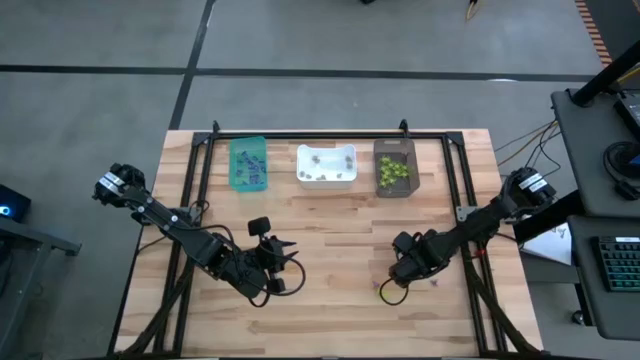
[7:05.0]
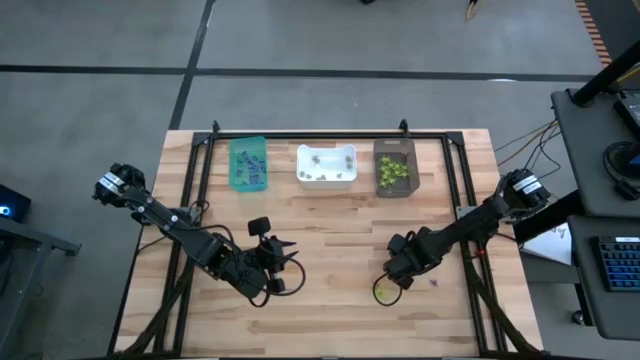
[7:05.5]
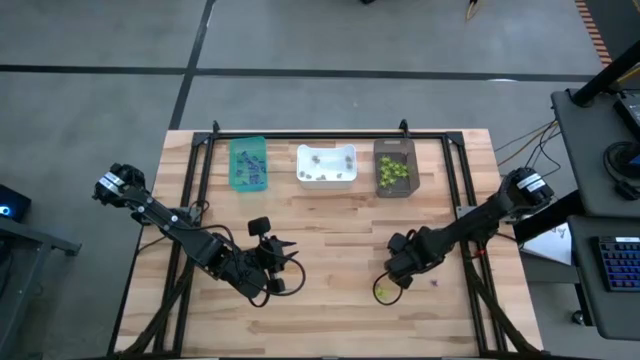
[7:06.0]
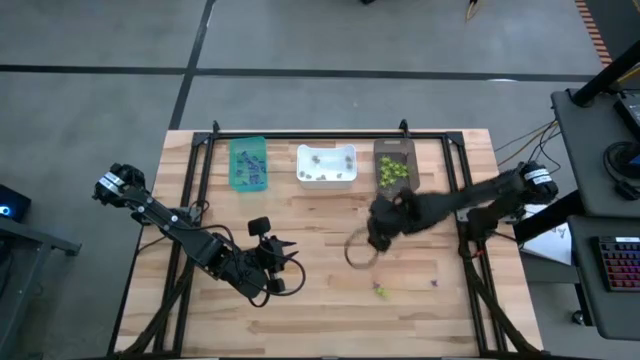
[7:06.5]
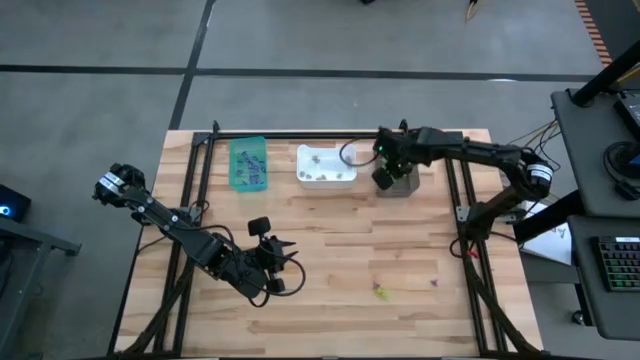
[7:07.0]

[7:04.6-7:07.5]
Task: Sort Halloween decoration
Put the green spider toy into the black bin

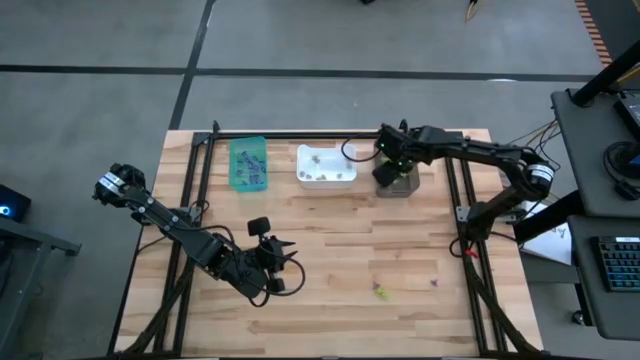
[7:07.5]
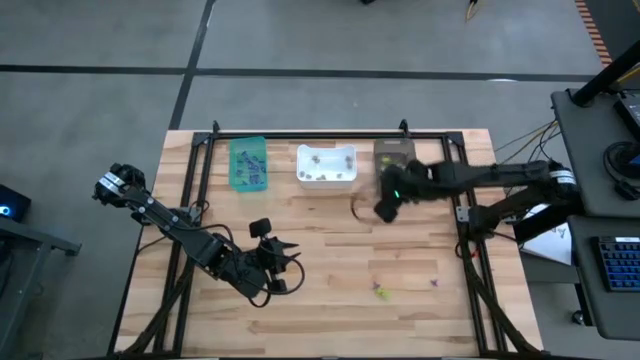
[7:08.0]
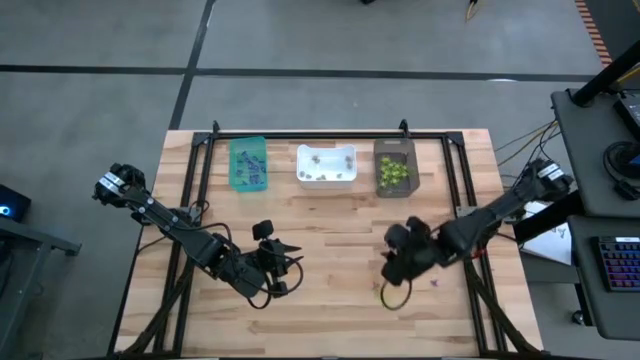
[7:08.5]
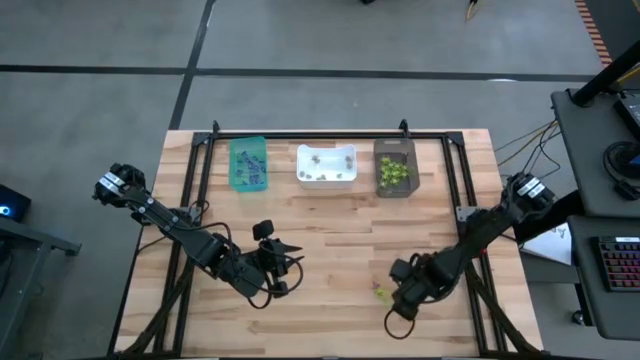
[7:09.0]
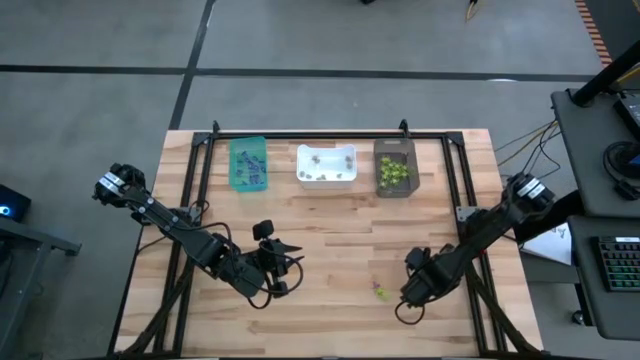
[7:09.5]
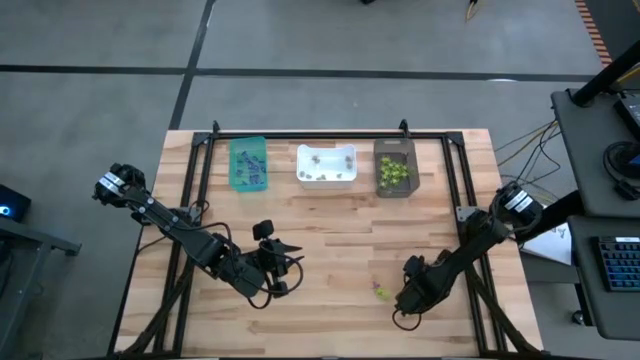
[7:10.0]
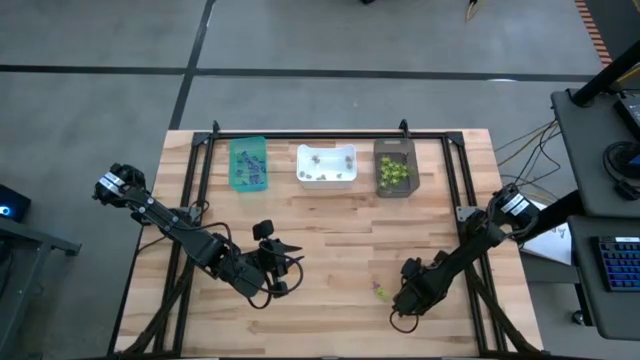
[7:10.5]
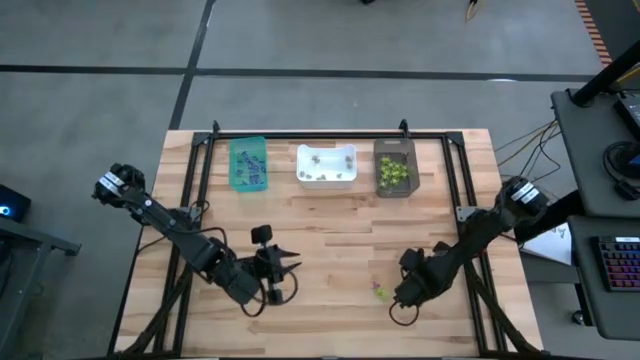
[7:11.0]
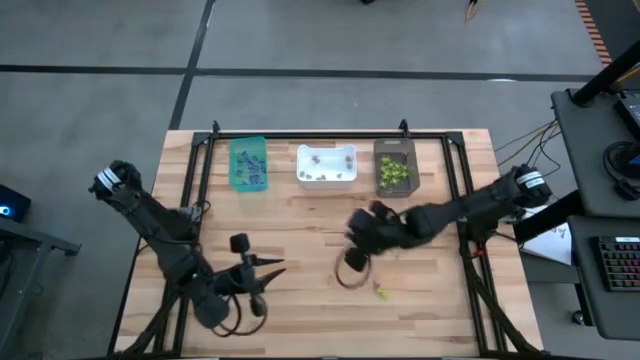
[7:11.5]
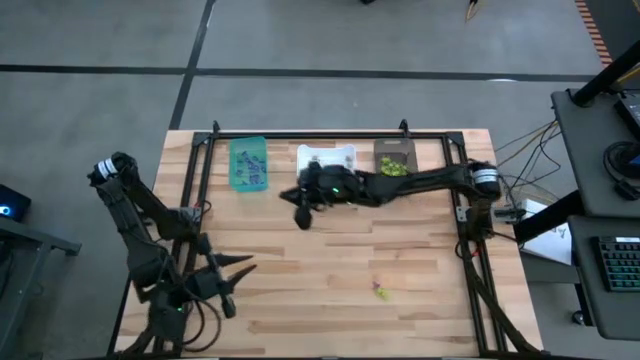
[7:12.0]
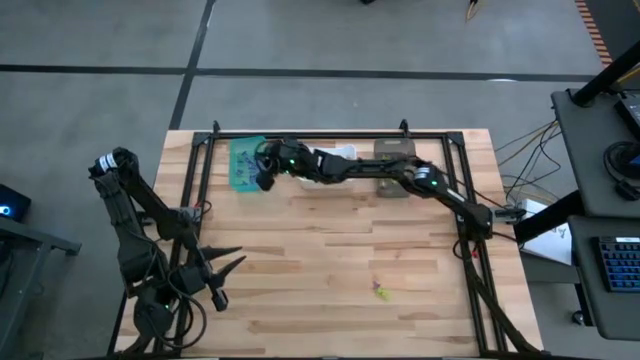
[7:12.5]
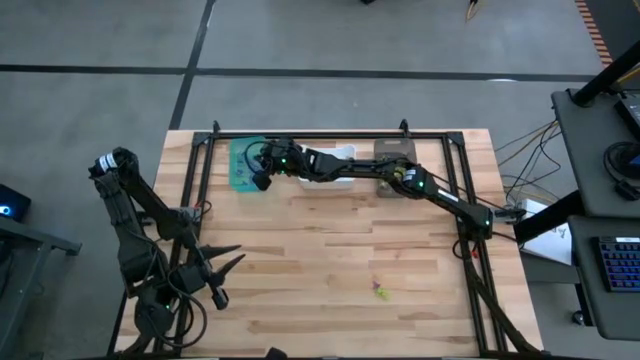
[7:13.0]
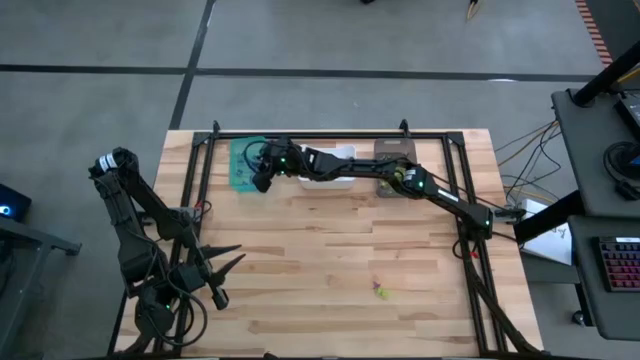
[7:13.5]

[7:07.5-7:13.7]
Put the purple witch toy into the light blue bin

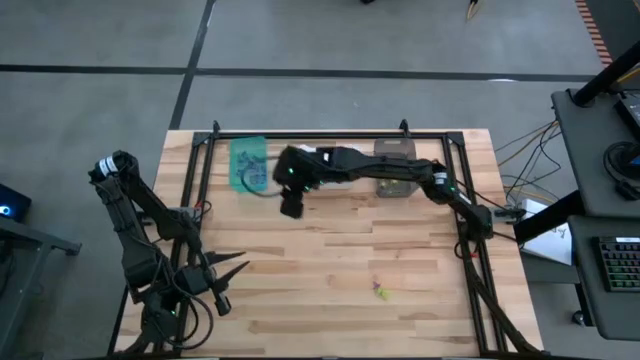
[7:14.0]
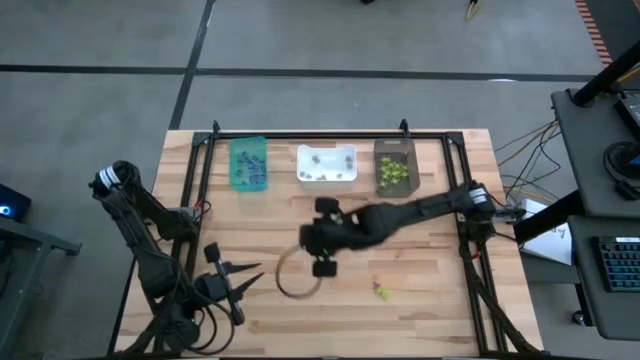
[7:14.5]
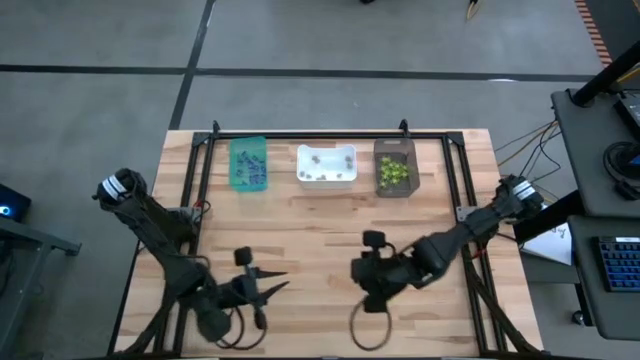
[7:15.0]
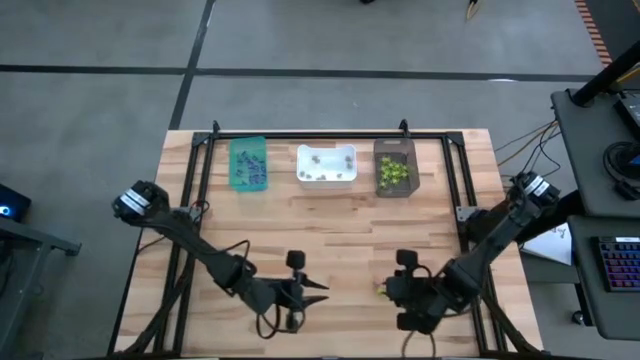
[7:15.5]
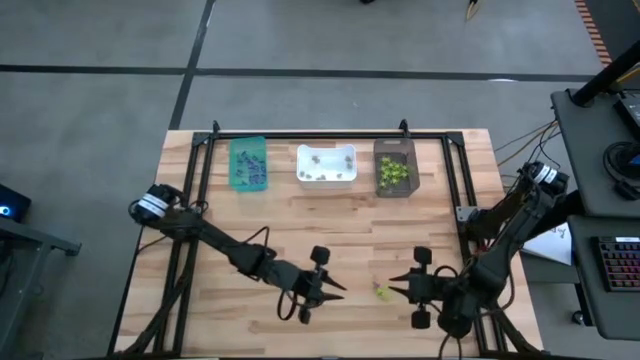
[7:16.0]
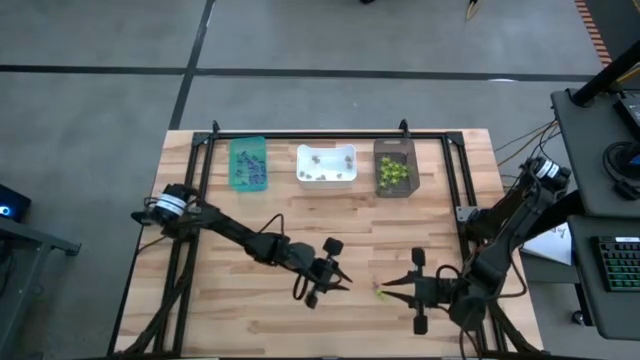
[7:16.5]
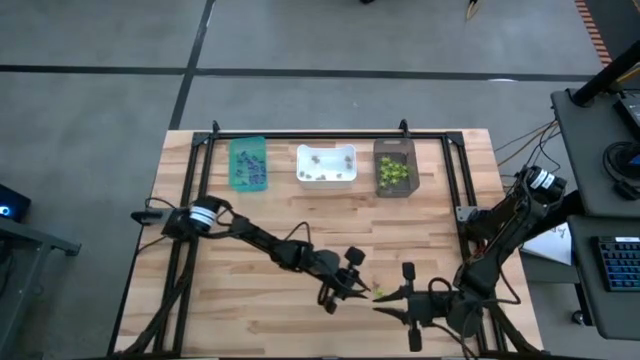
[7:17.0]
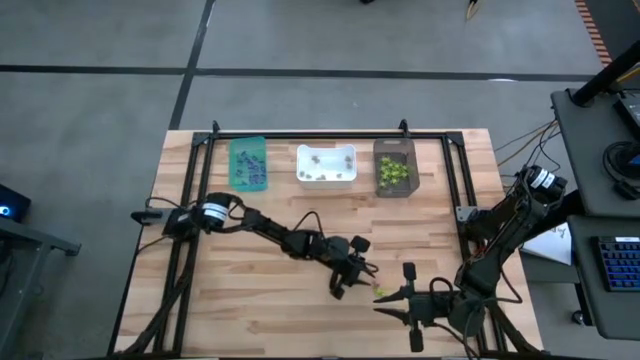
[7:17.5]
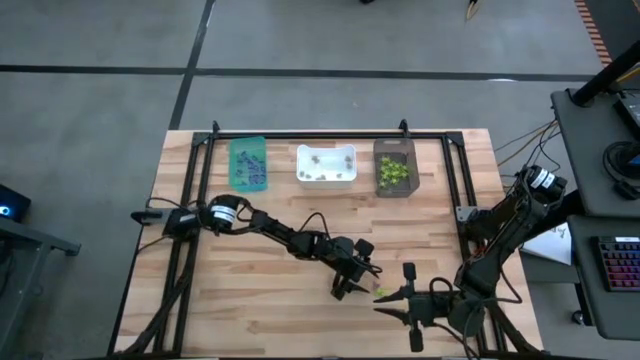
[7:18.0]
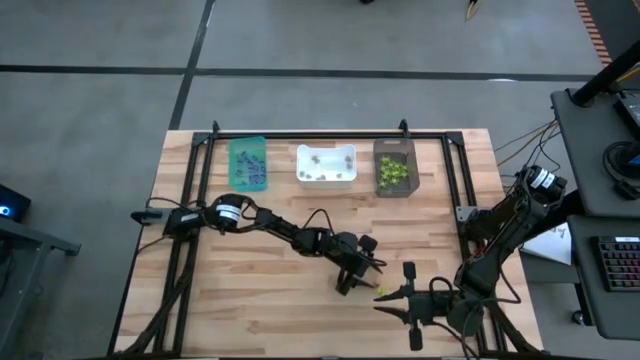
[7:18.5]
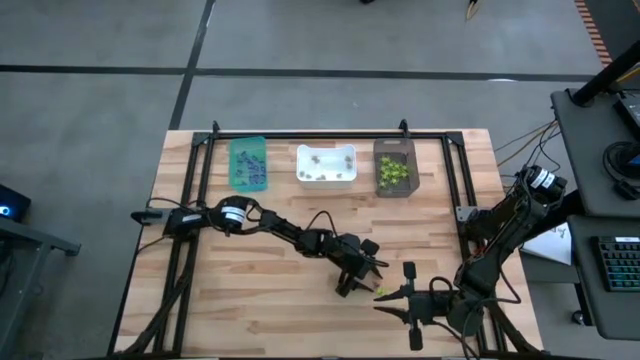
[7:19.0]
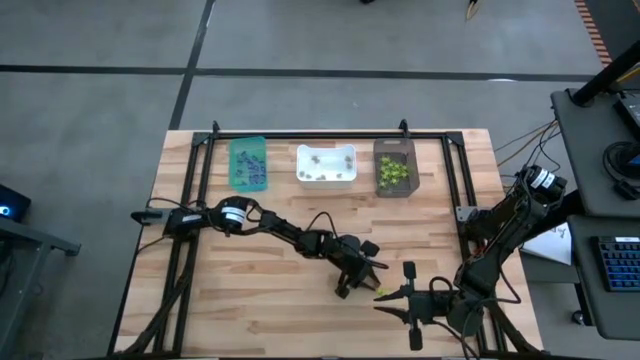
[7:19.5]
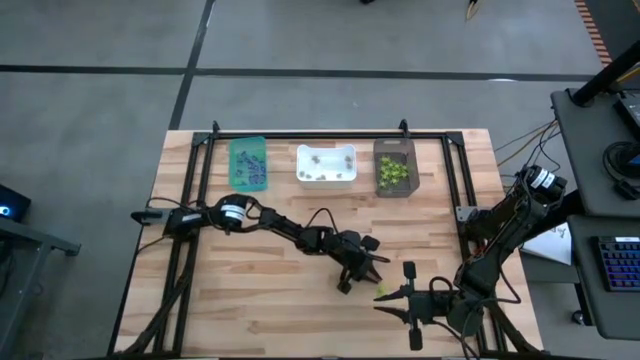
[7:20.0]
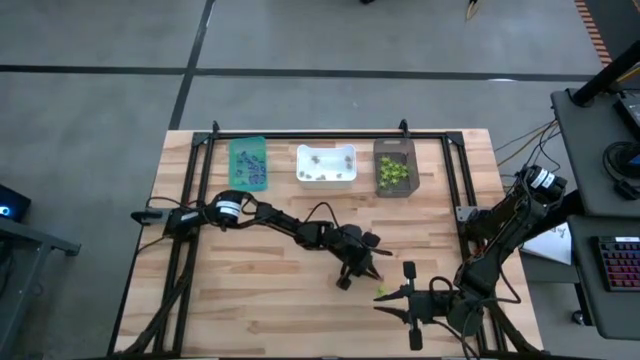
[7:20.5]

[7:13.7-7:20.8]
Put the purple witch toy into the light blue bin

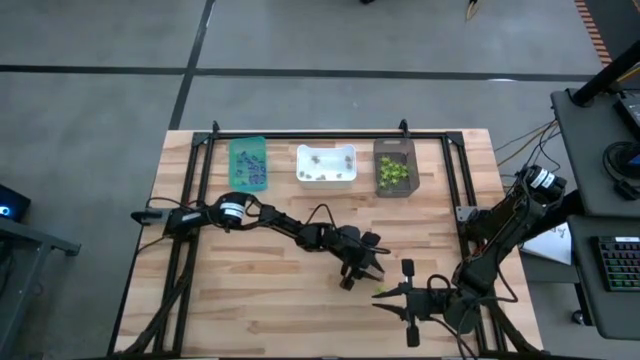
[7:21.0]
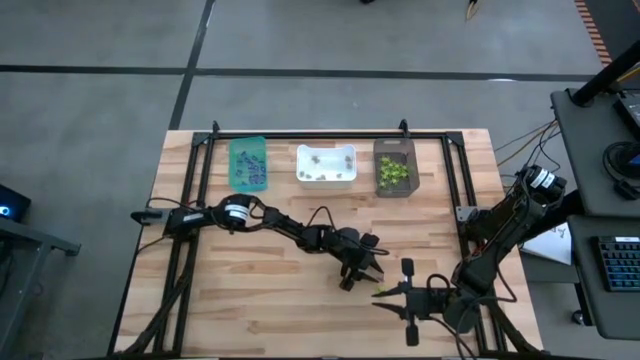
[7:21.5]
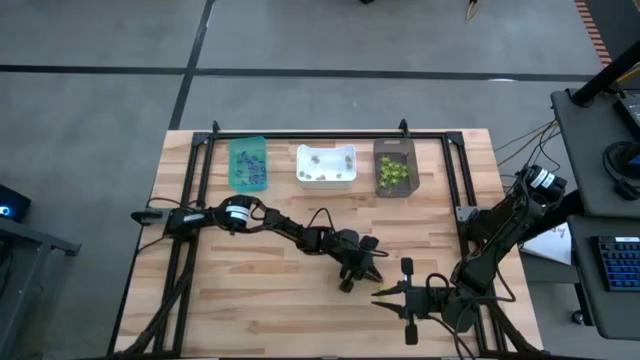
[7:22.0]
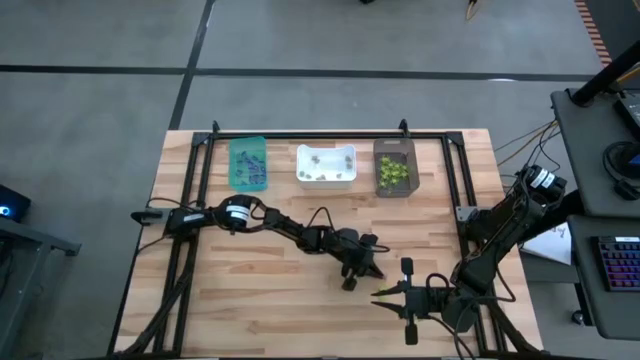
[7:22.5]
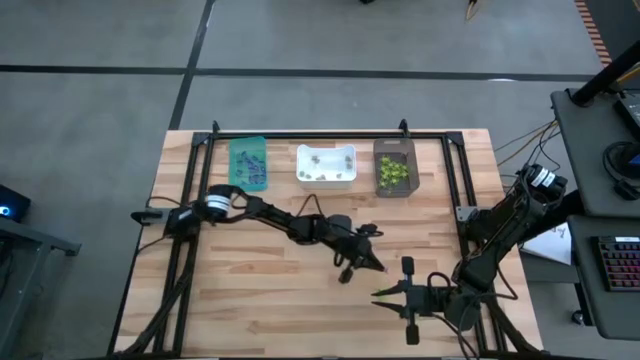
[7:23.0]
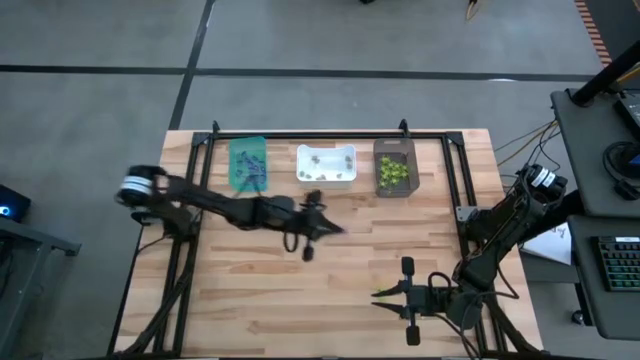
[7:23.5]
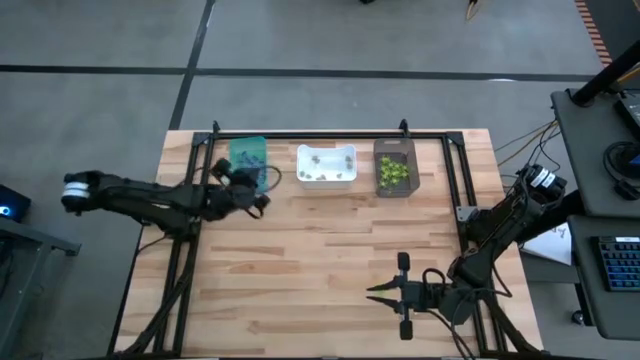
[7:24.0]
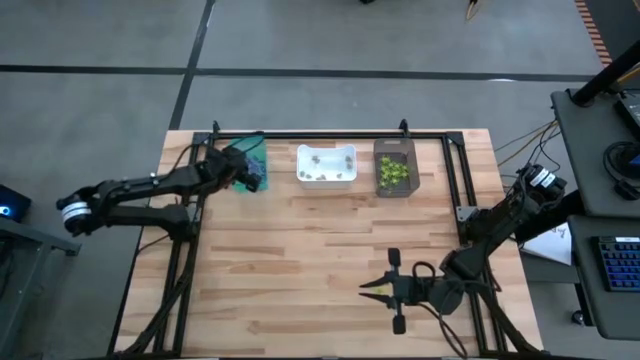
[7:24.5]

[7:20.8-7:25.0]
Put the purple witch toy into the light blue bin

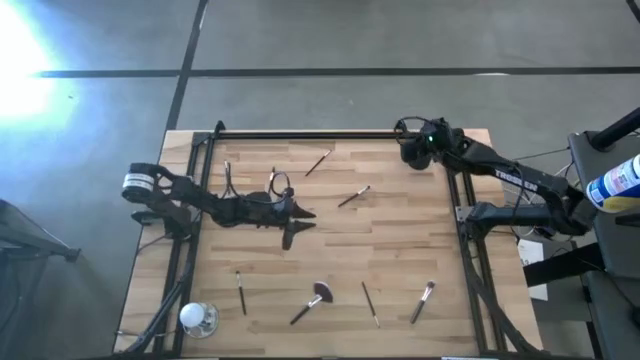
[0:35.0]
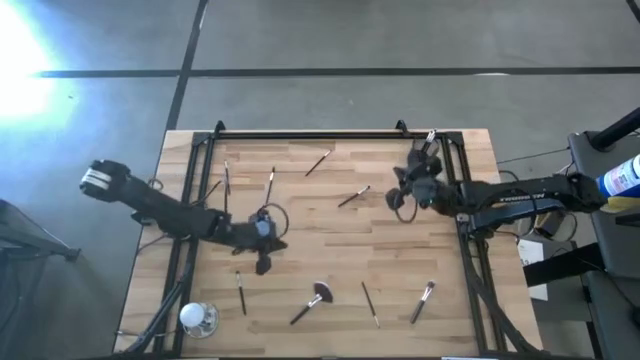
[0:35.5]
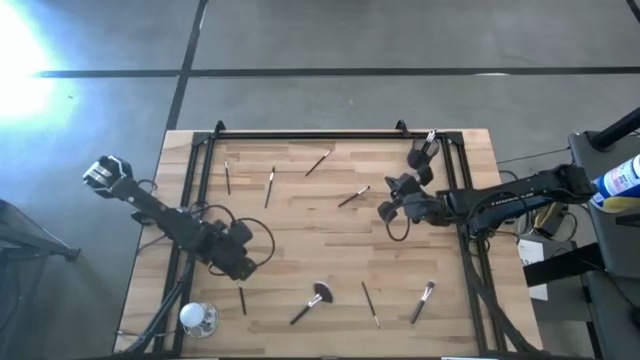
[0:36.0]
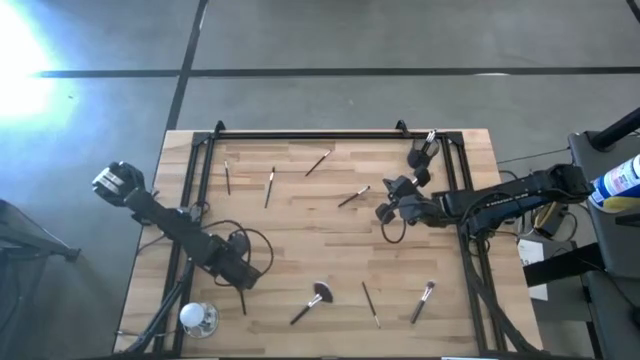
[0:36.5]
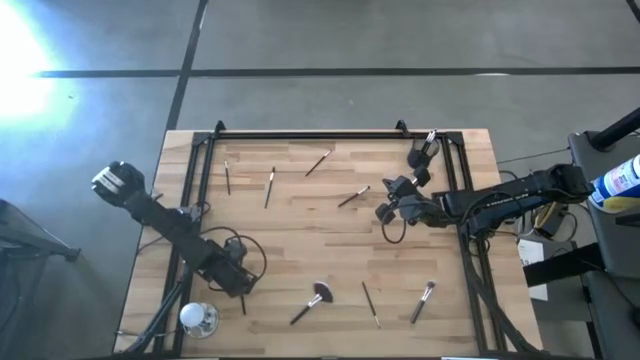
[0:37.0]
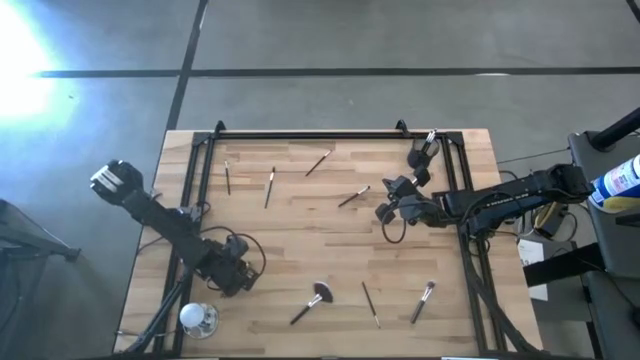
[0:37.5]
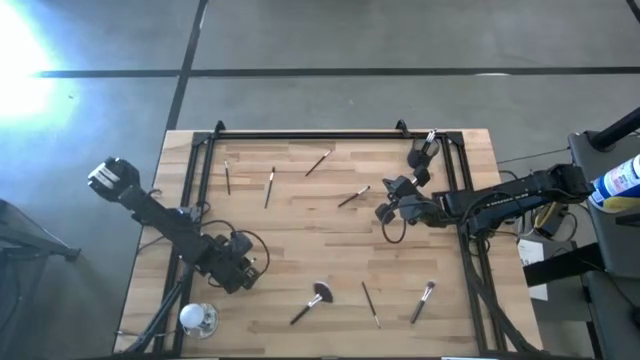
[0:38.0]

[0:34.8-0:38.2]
Task: Put items in baskets/containers
Put the eyeshadow brush into the pen holder
